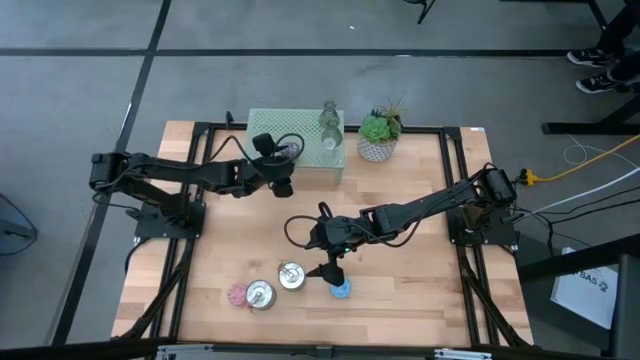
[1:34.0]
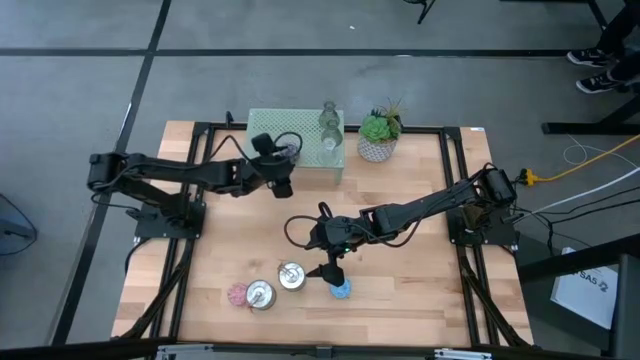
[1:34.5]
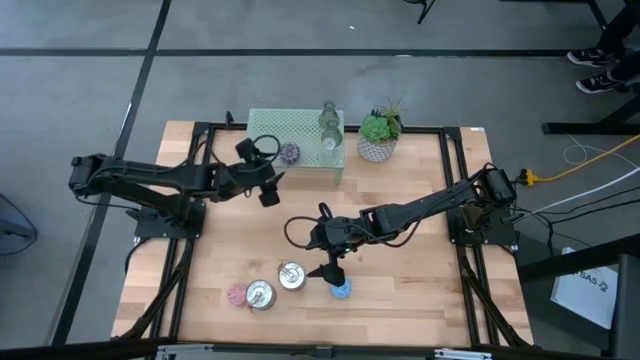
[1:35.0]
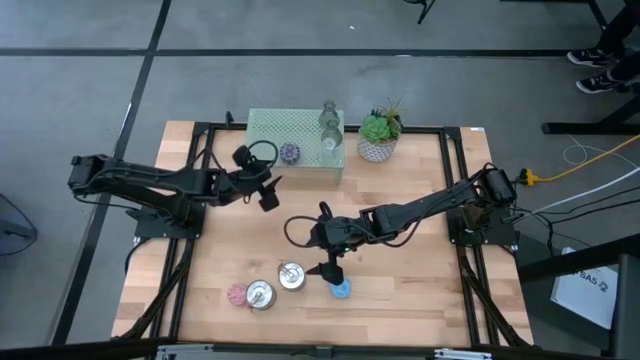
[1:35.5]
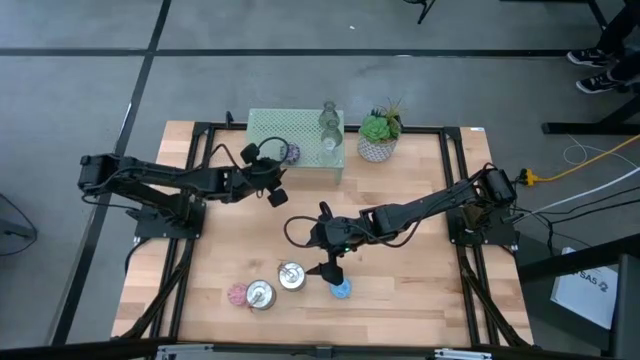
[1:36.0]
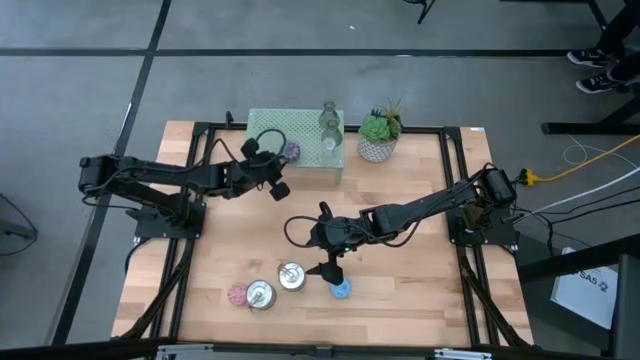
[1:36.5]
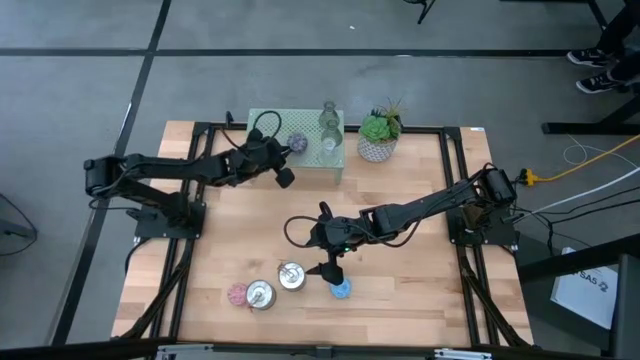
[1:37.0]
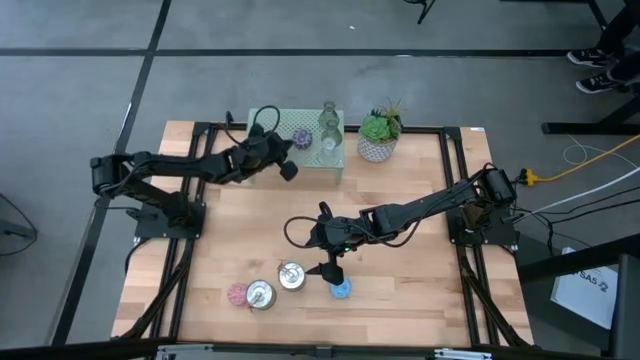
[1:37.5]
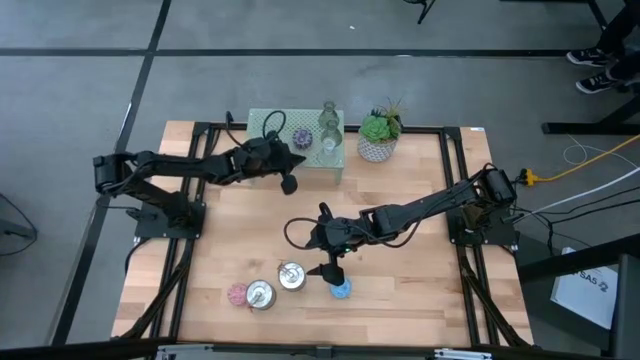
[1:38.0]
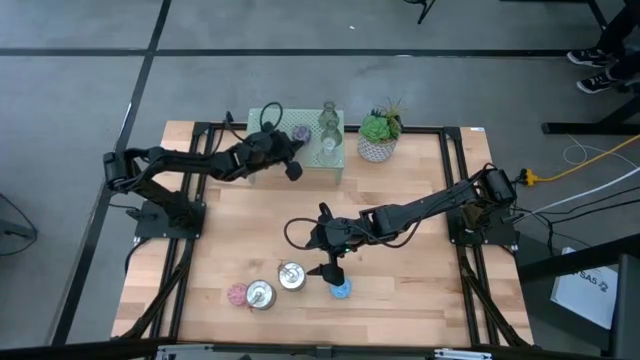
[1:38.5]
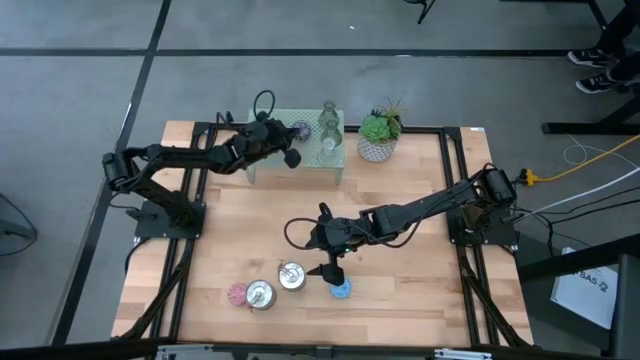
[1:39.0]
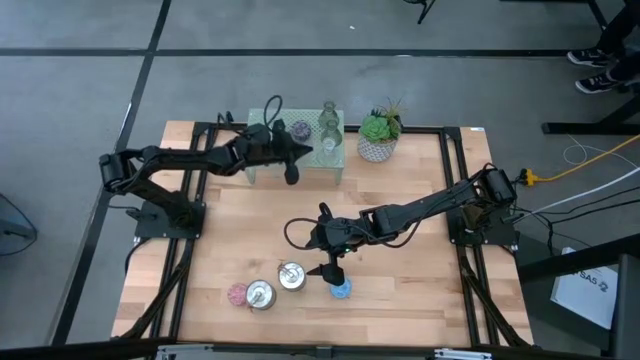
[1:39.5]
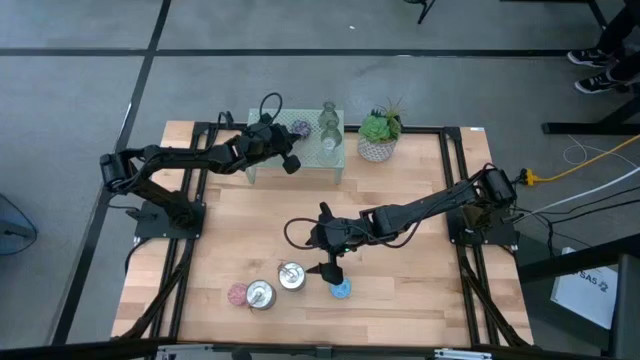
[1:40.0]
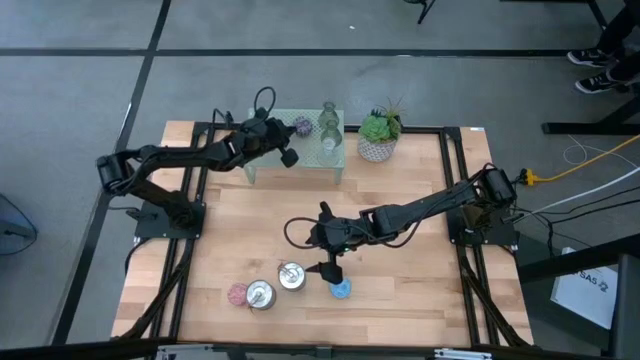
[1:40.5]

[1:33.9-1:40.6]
Task: Pick & Place candle stick holders
Adjust the black and red candle on the shelf

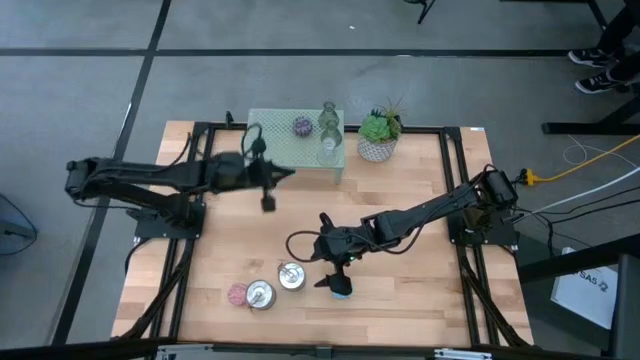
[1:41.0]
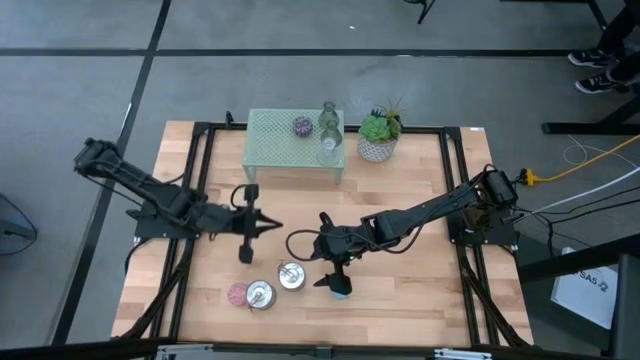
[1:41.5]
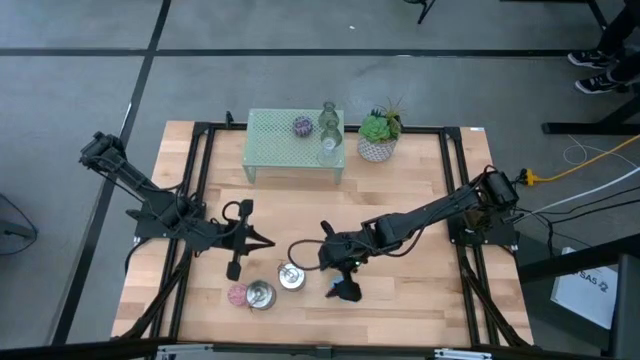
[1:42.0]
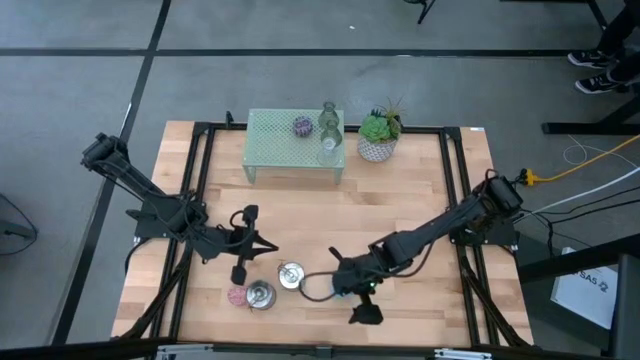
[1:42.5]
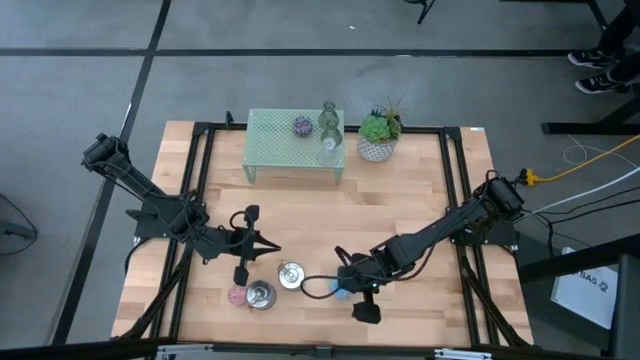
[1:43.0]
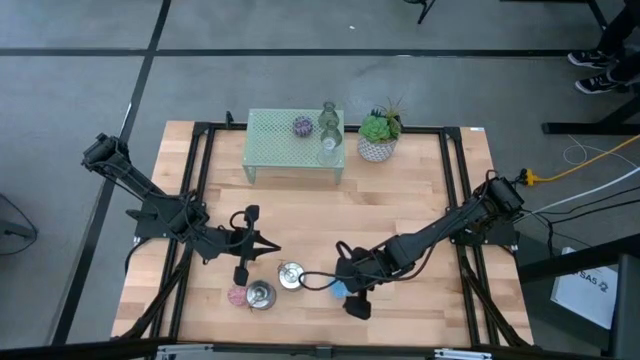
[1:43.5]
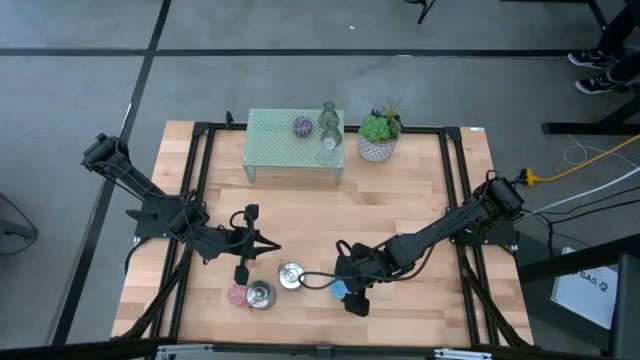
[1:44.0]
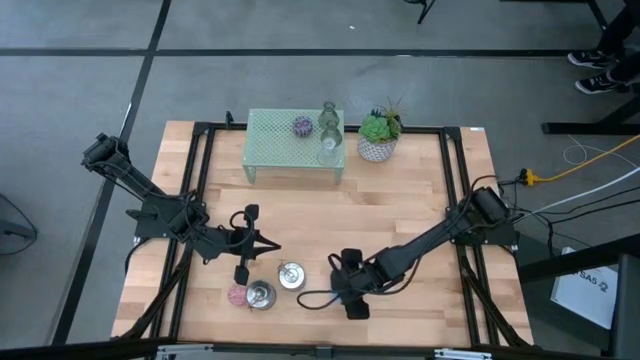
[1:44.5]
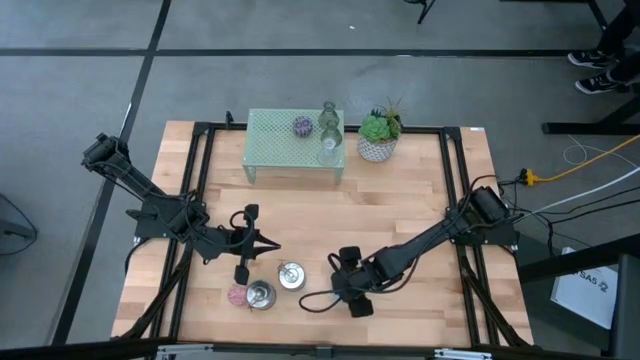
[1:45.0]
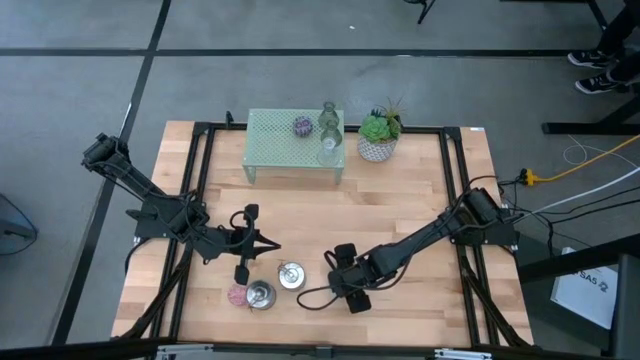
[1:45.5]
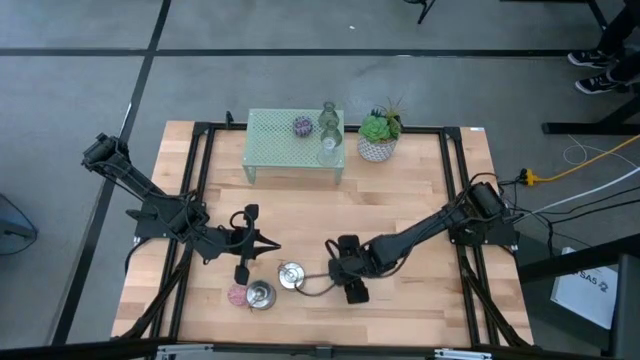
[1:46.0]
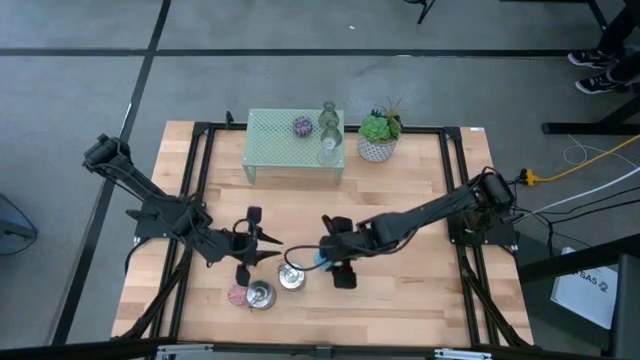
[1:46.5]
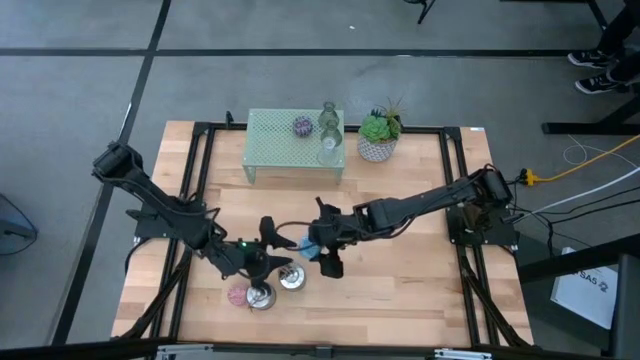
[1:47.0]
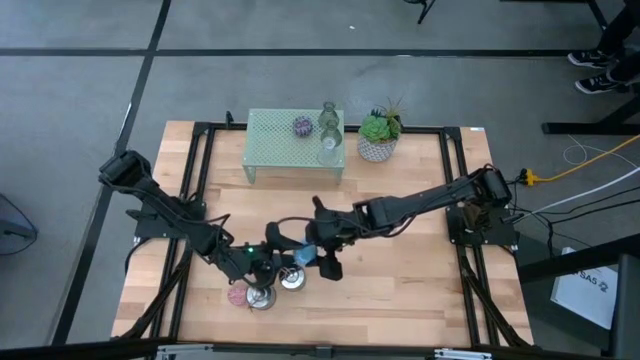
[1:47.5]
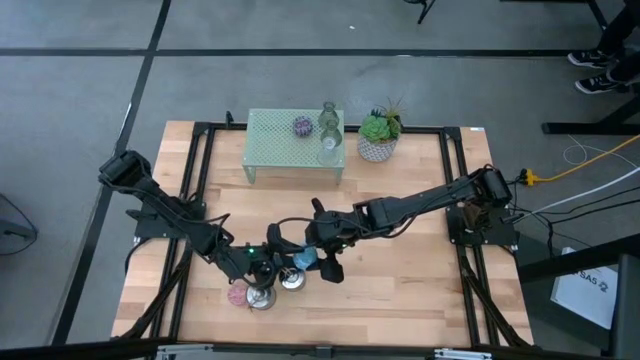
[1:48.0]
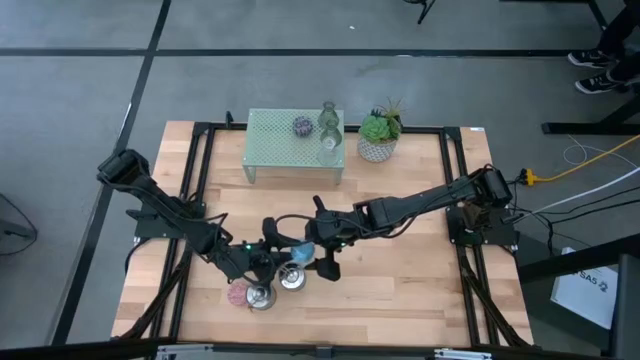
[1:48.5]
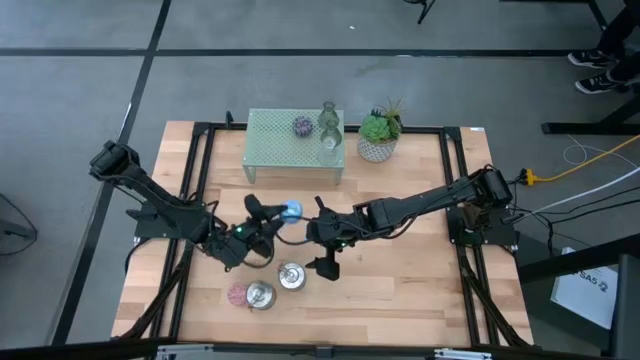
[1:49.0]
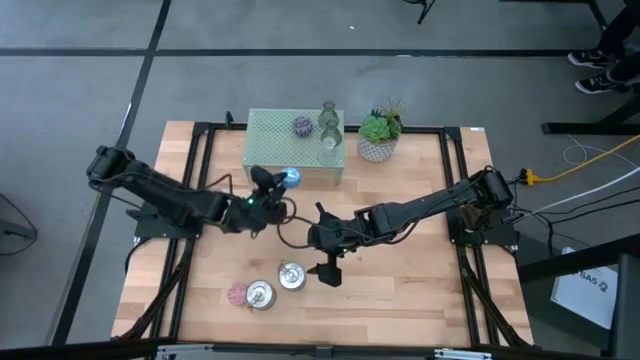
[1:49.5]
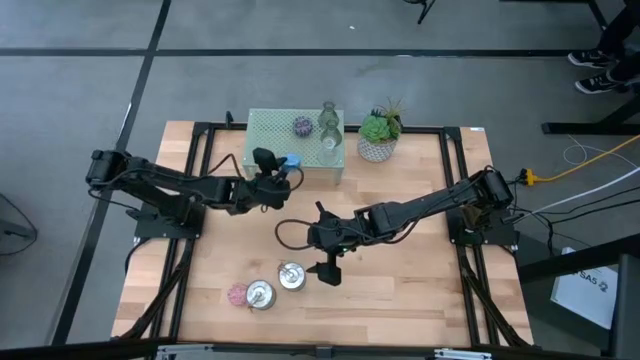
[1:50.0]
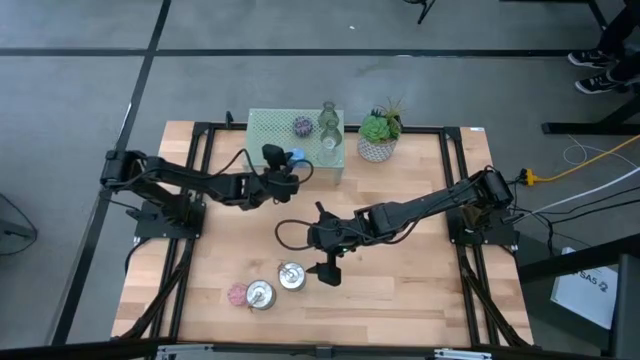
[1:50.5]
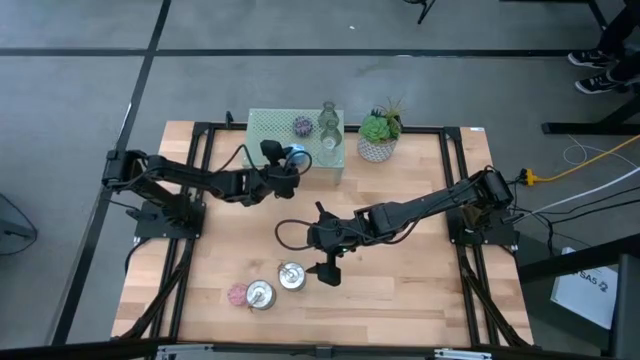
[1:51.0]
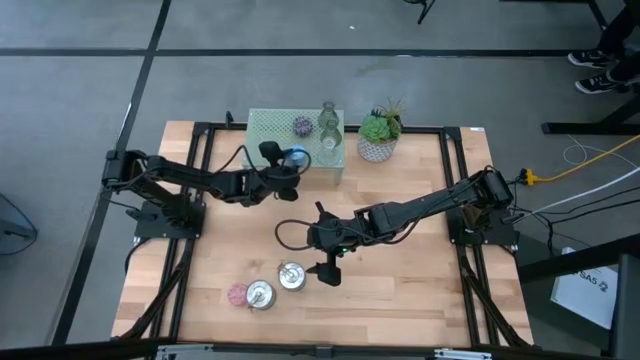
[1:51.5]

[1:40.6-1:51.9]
Put the light blue candle on the shelf

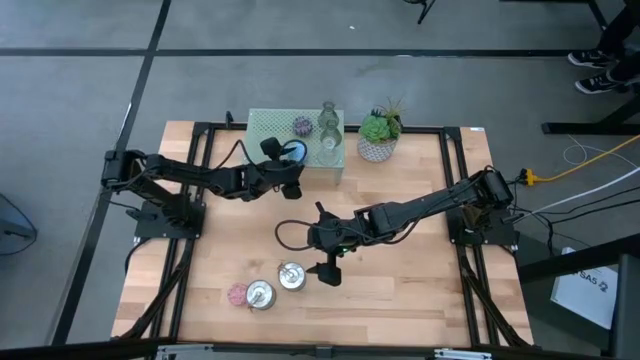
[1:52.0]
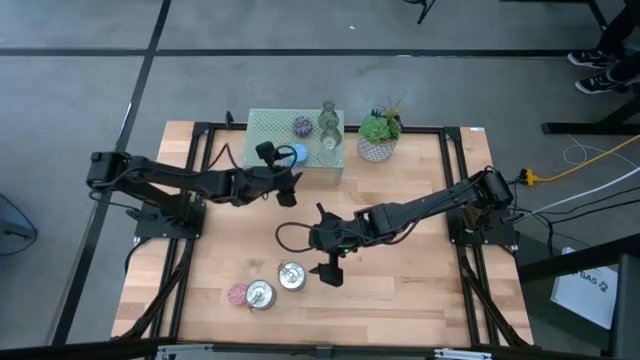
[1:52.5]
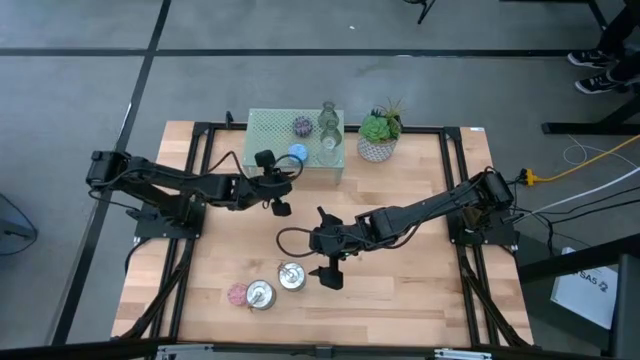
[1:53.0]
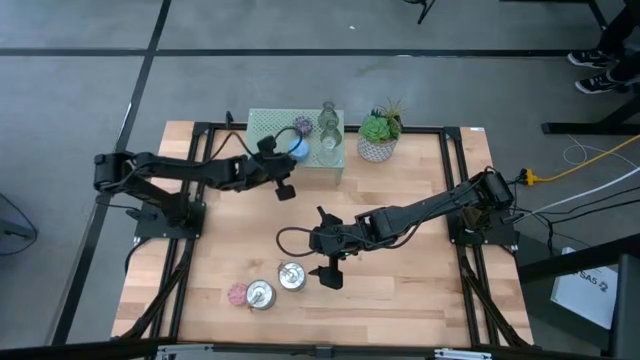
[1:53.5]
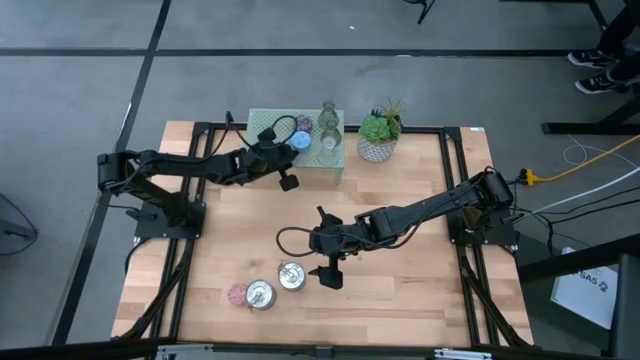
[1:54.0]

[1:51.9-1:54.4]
Adjust the light blue candle on the shelf
